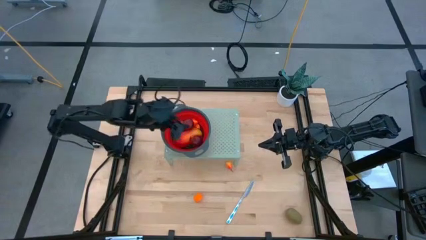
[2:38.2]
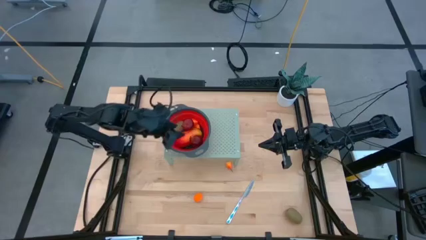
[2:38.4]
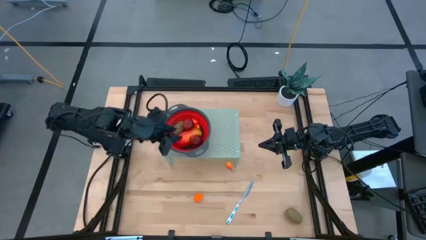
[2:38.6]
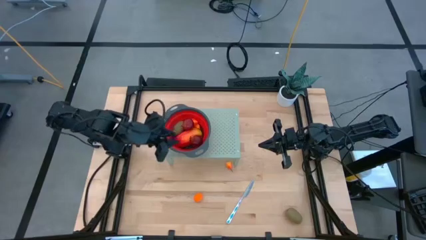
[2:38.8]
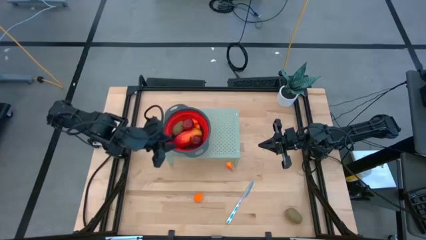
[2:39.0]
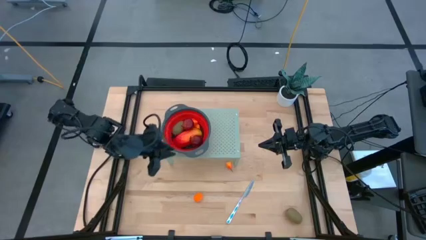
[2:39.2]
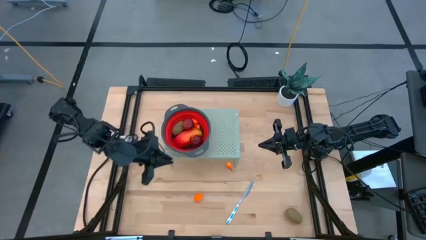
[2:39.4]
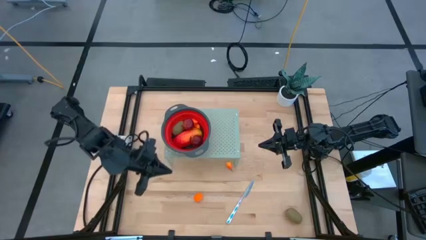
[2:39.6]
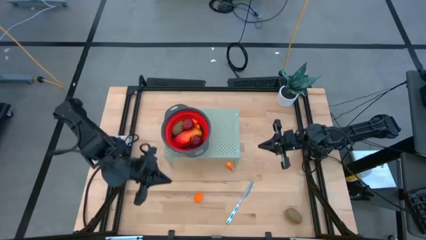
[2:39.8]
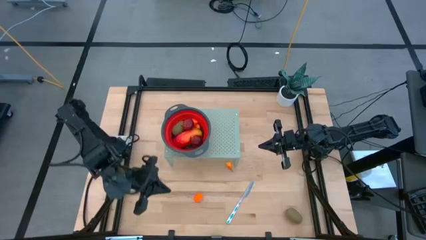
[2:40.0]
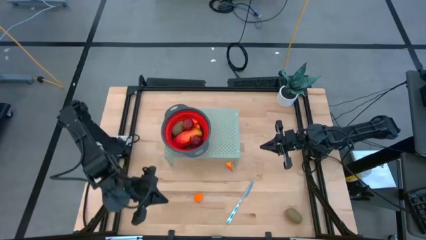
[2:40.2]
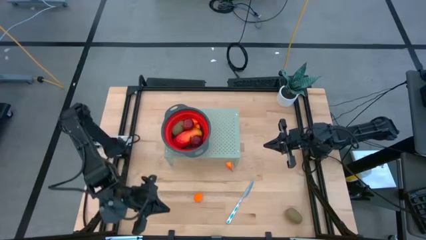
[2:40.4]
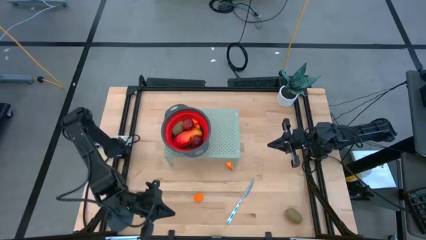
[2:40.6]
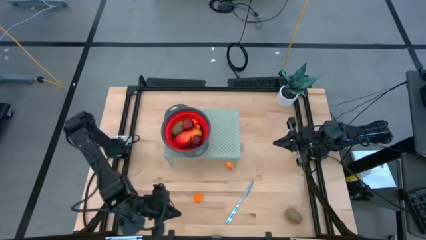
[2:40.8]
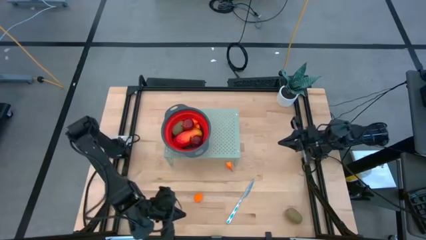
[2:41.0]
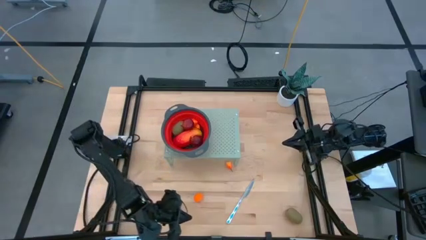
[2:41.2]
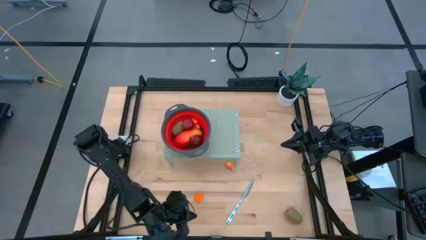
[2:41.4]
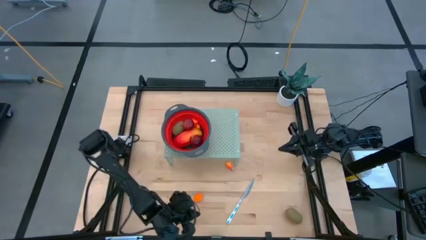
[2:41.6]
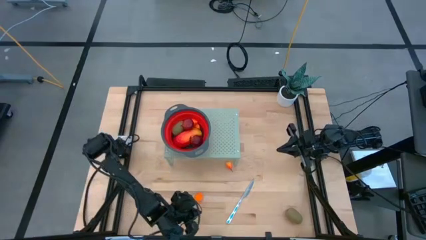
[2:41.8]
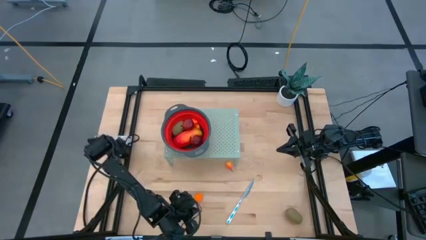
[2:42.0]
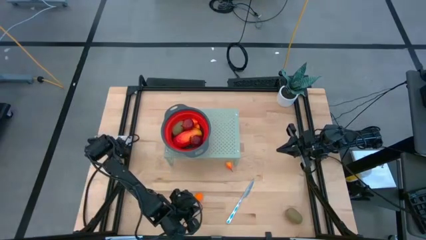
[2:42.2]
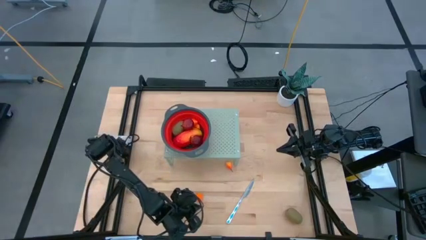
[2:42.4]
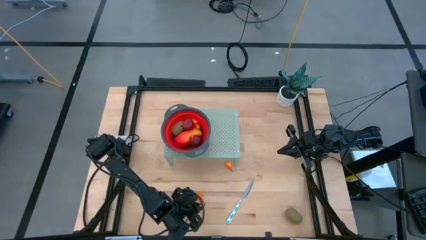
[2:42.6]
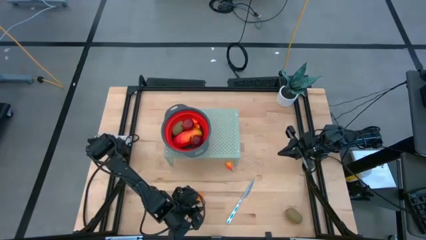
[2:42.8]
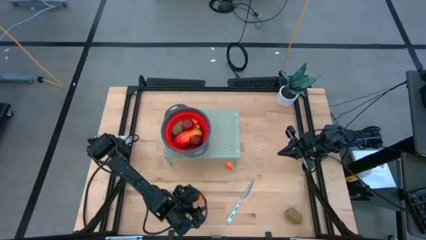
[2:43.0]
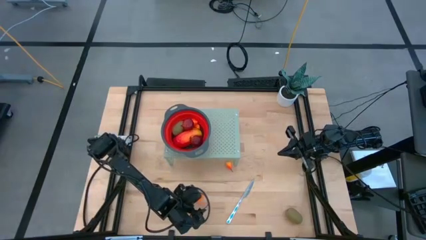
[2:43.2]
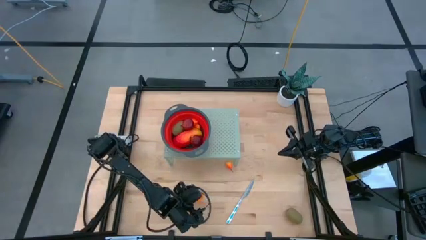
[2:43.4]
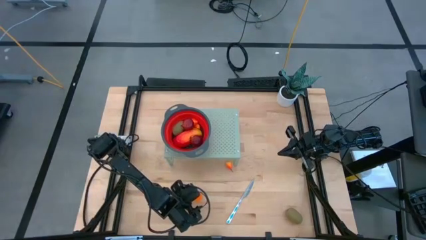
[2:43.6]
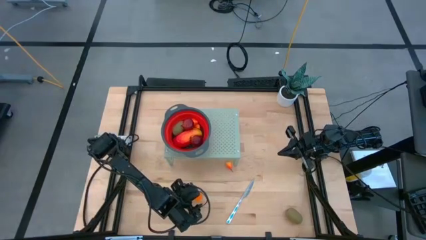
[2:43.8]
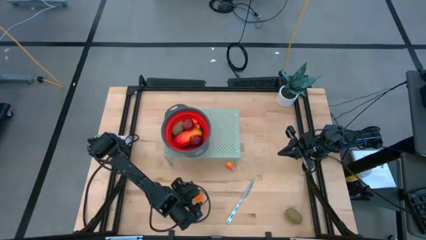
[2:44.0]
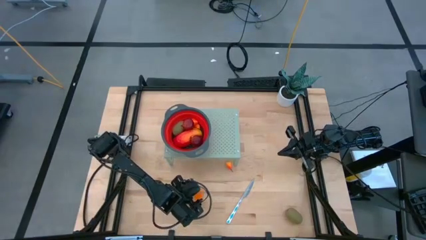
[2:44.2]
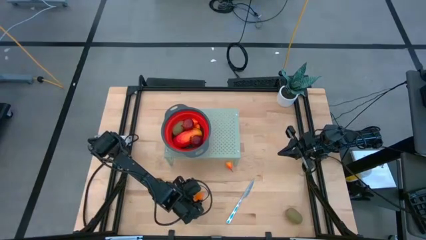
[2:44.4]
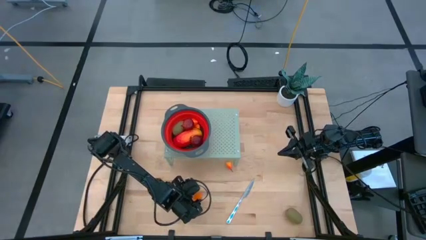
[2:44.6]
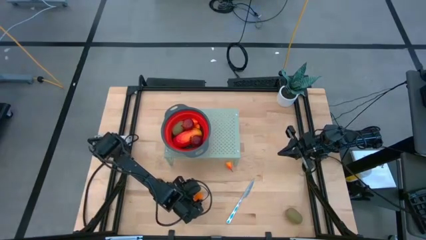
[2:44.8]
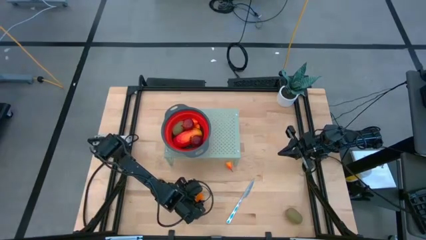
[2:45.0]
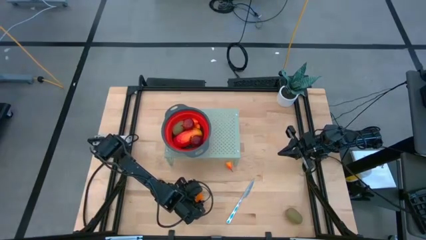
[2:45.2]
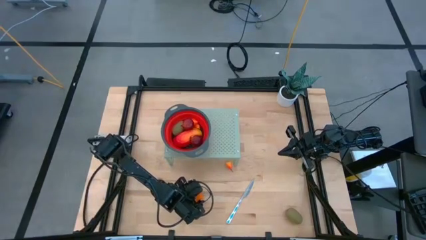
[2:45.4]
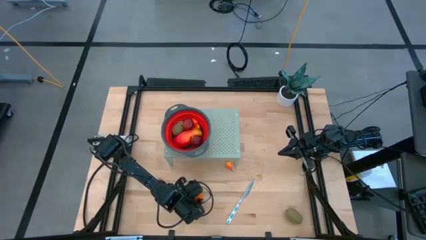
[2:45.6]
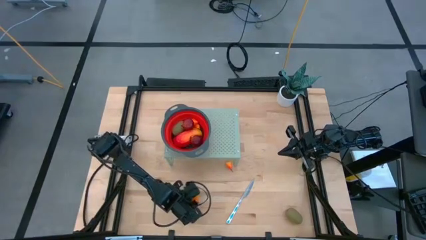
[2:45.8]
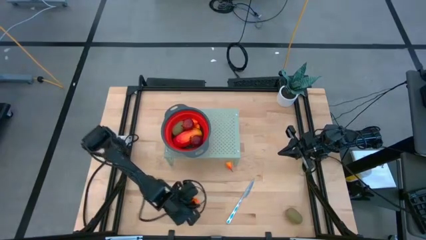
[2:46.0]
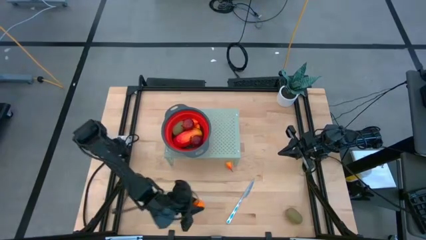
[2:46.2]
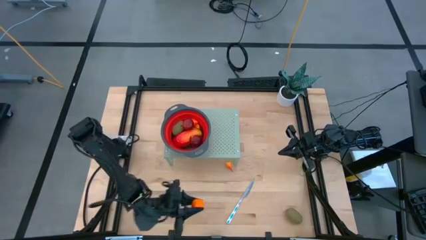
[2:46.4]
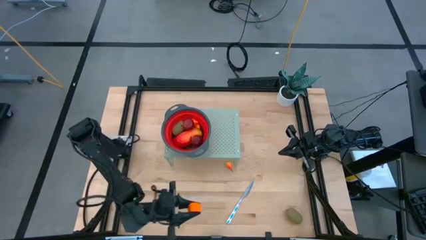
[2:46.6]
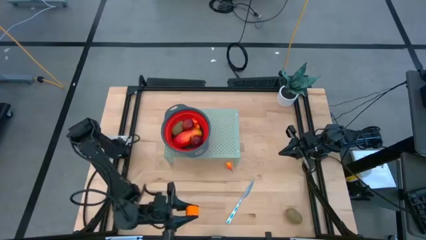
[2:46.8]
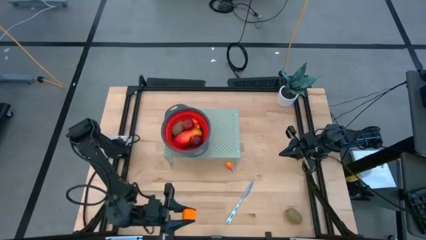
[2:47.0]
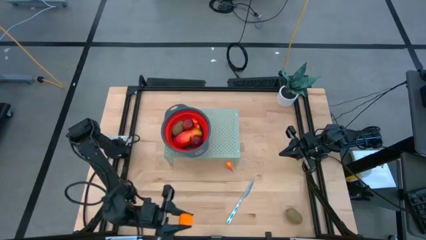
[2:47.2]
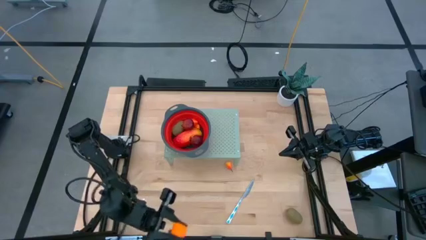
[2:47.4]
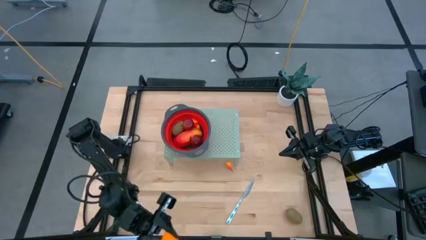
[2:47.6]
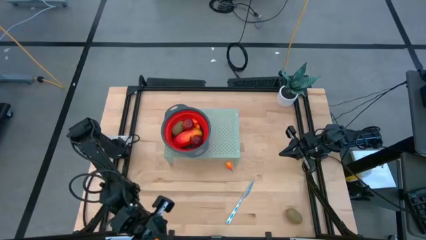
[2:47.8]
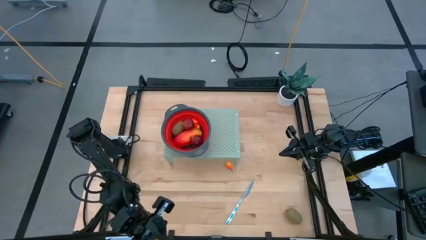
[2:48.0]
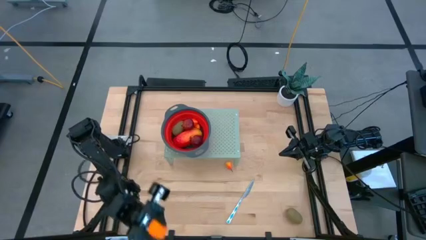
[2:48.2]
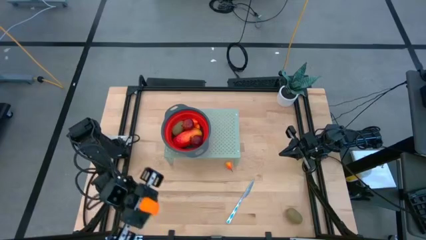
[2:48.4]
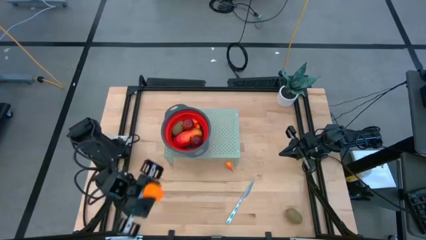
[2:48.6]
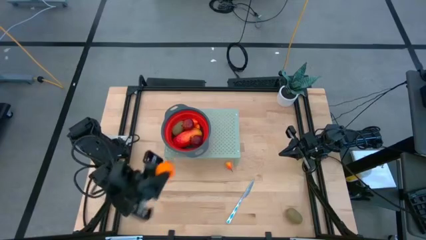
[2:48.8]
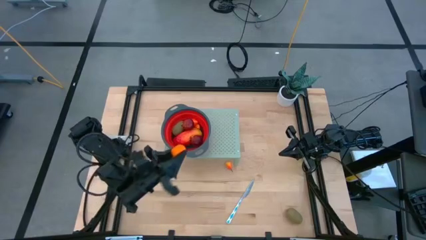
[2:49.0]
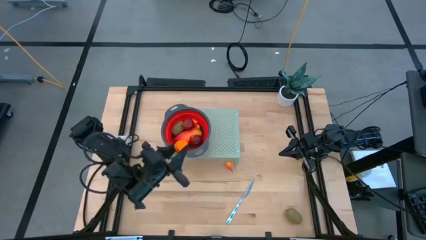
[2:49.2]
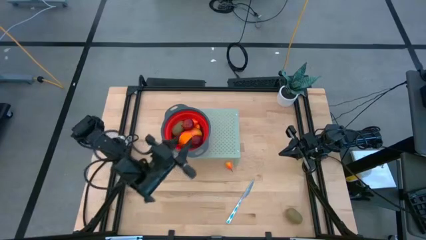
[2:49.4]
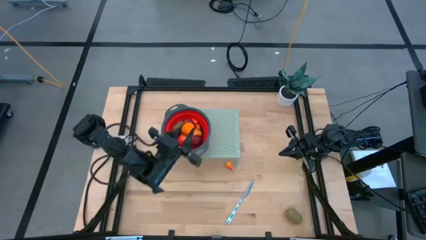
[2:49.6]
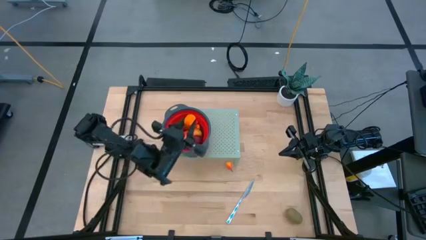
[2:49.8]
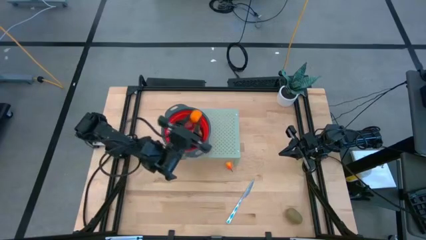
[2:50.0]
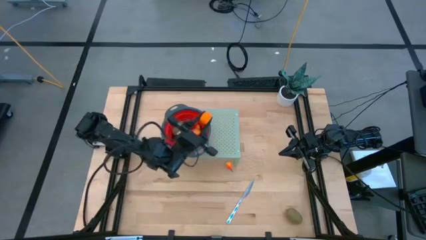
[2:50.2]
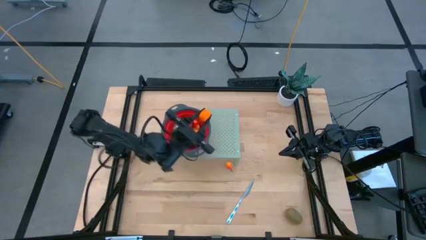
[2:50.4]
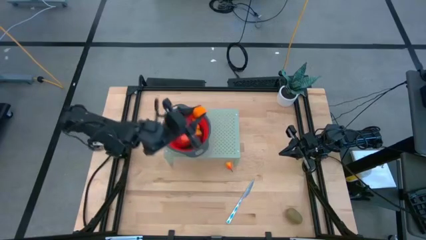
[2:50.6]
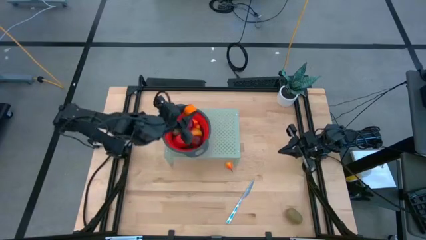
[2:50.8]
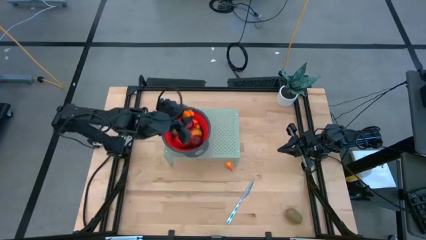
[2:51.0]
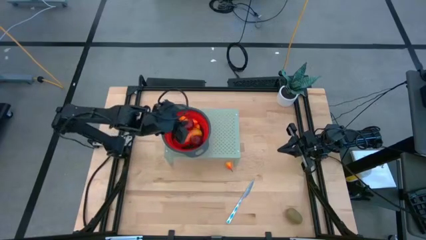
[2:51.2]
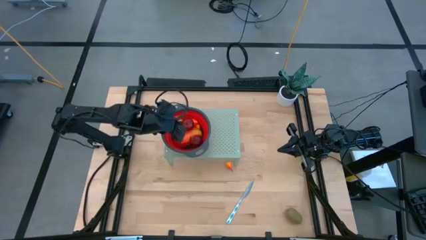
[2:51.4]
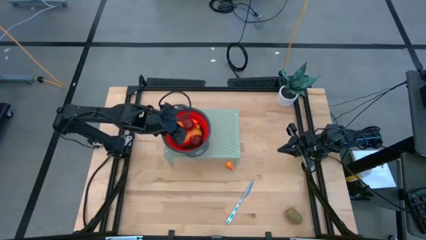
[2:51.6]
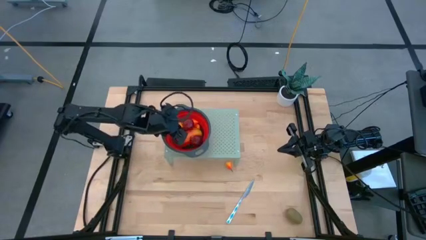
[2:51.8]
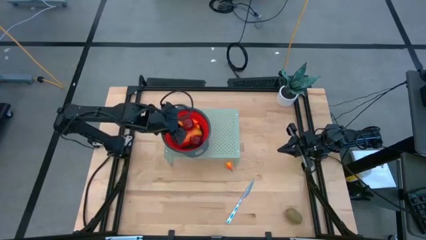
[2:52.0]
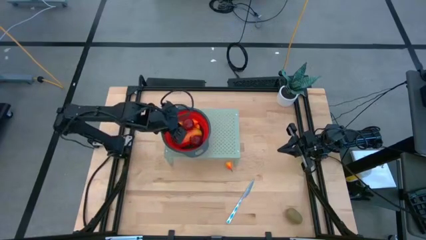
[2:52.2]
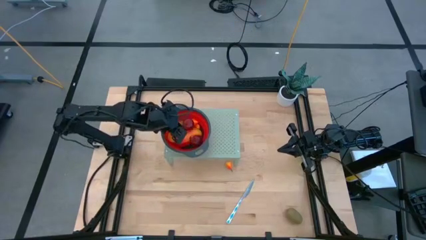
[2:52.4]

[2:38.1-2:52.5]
Task: Pick & Place Fruit
Put the orange into the red strainer bowl on the shelf

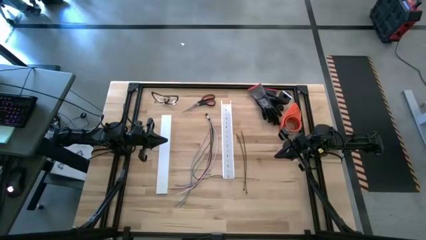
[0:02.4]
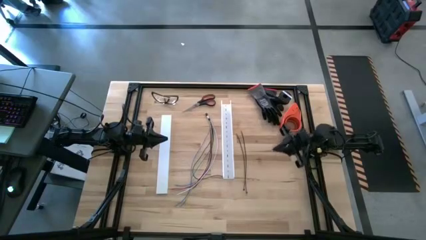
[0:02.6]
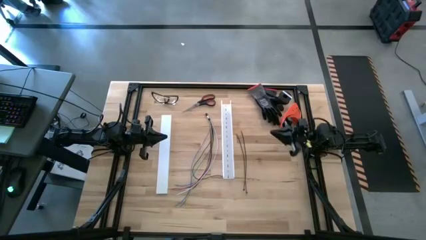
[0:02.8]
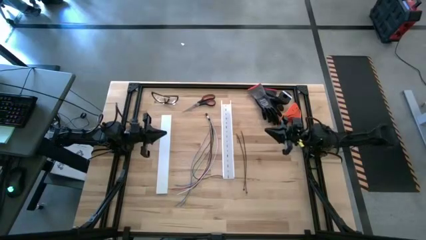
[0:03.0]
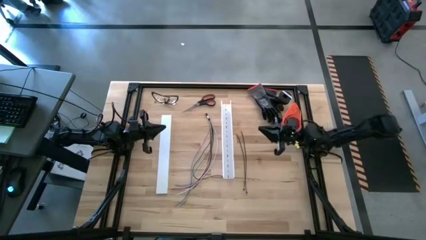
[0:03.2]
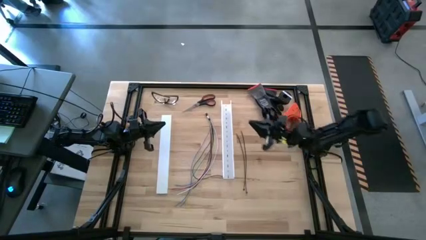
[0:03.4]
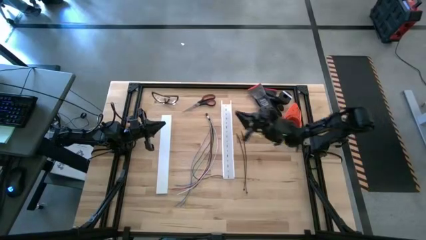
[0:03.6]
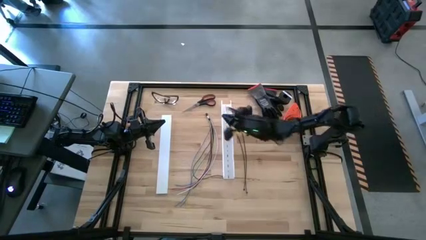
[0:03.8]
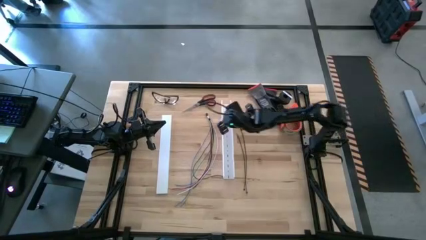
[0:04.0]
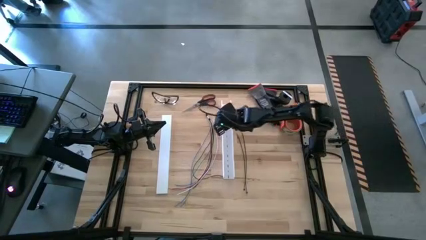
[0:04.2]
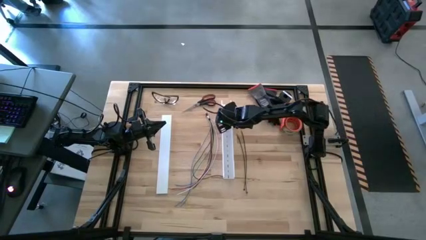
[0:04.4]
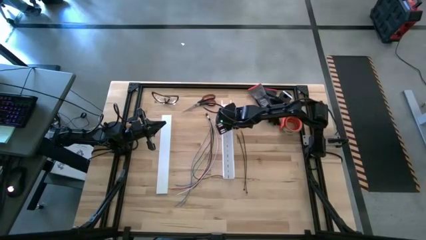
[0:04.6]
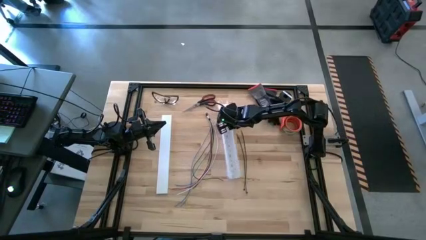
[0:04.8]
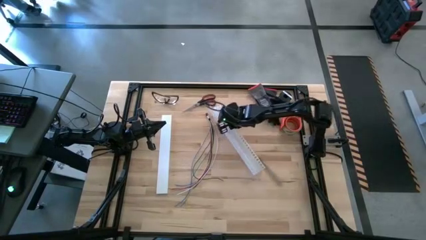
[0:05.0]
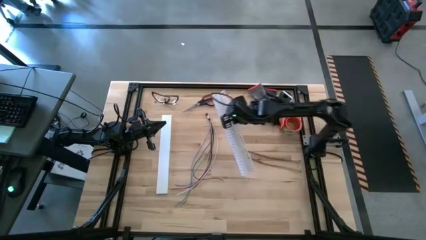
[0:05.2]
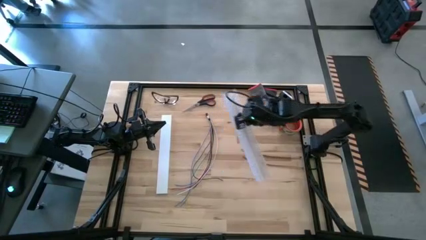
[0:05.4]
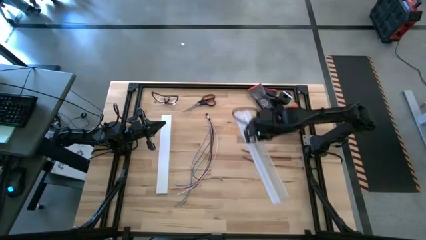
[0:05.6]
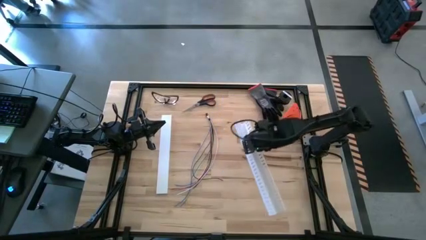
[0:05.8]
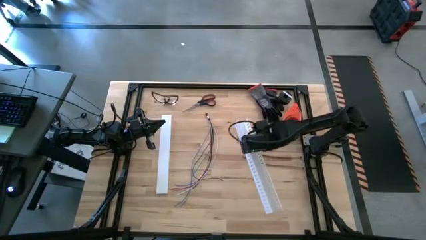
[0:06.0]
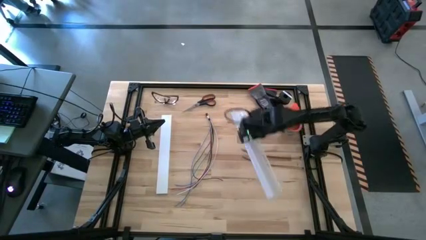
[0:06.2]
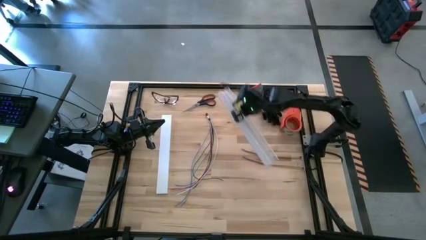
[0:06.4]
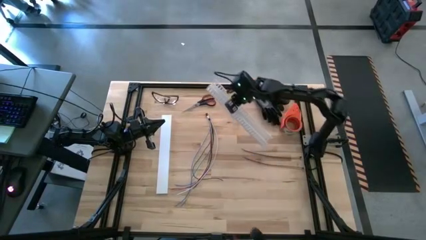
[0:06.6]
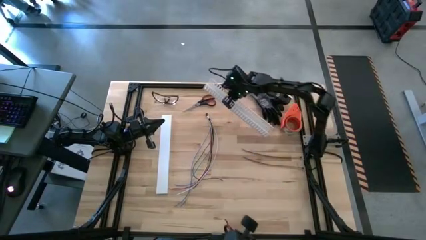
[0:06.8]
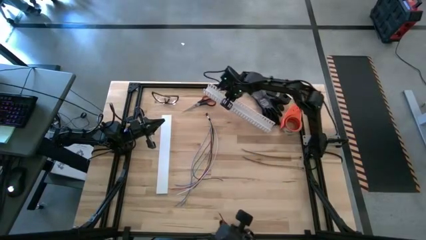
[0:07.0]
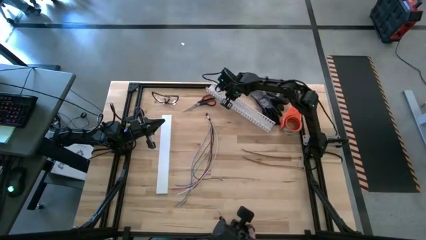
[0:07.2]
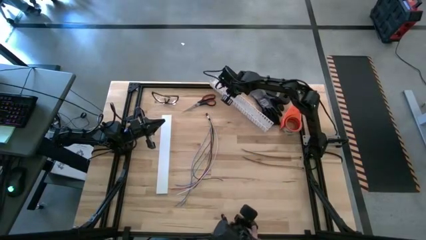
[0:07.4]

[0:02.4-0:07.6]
Task: Ziptie cables
Move the white cable duct lid to the top of the table
